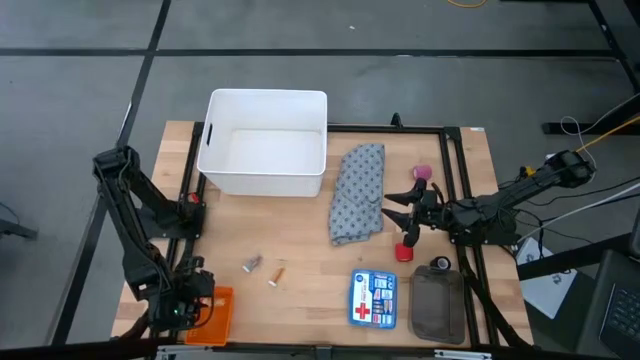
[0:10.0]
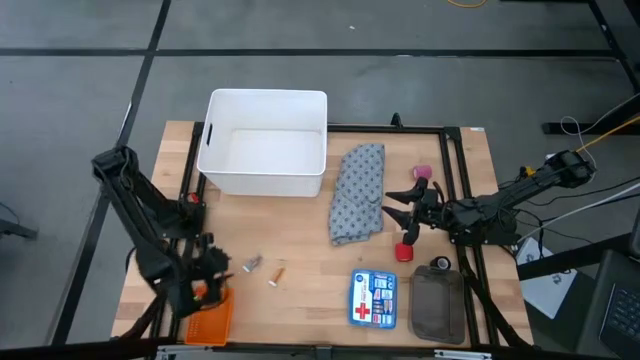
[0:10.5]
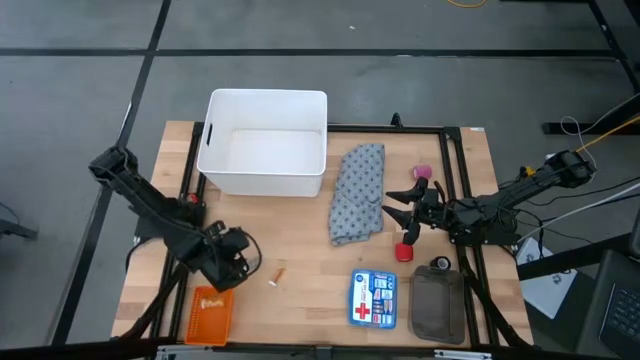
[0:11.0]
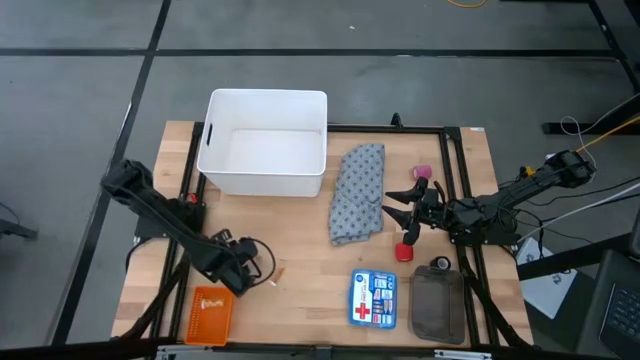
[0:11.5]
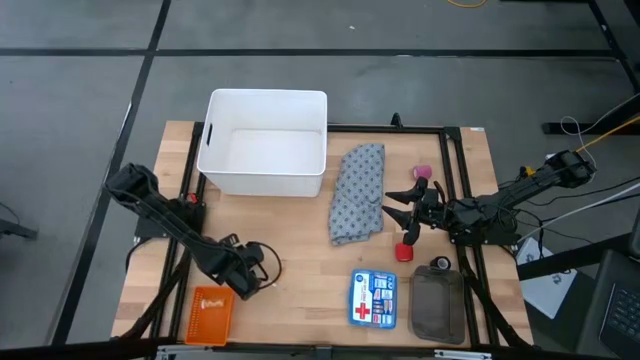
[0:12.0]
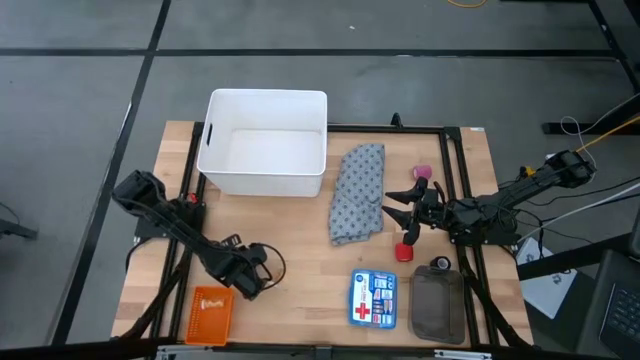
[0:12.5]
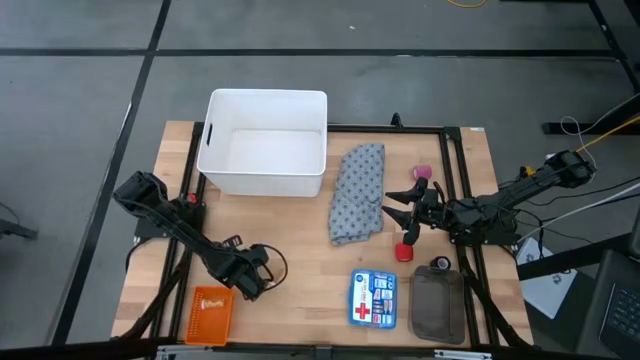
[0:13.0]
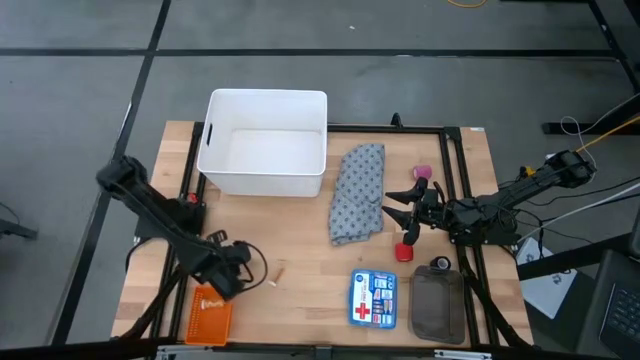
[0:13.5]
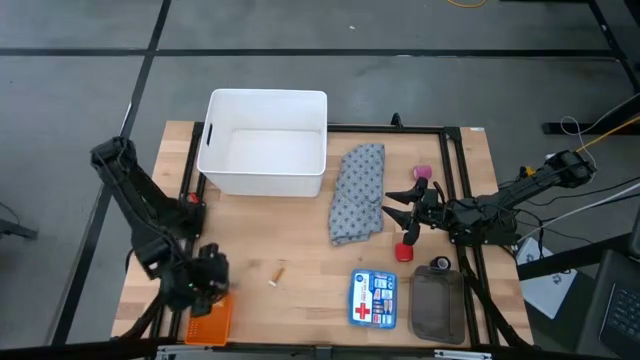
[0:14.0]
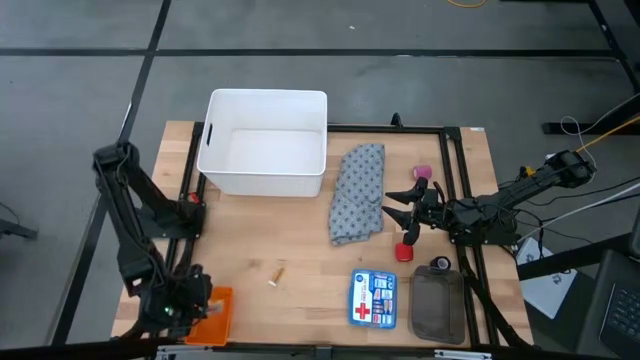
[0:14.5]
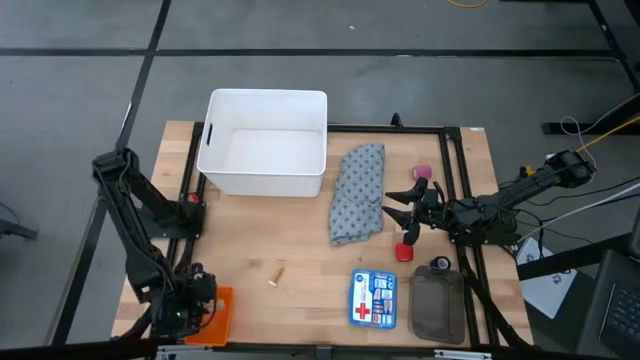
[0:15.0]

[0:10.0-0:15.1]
Task: Pick & place medical supplies in basket/bin
Put the blue pill bottle into the orange bin

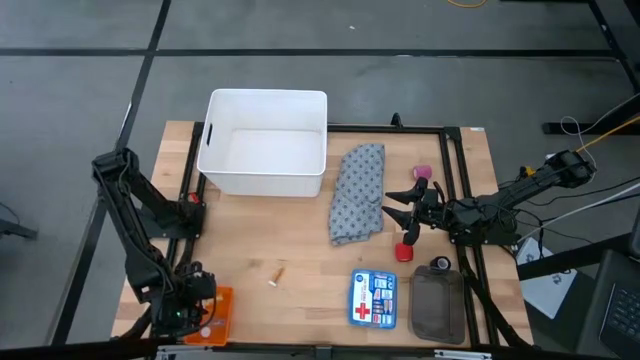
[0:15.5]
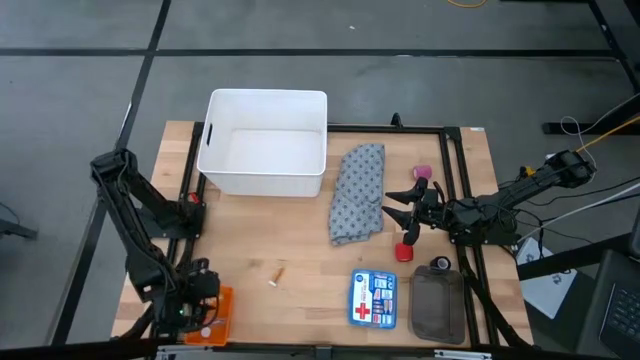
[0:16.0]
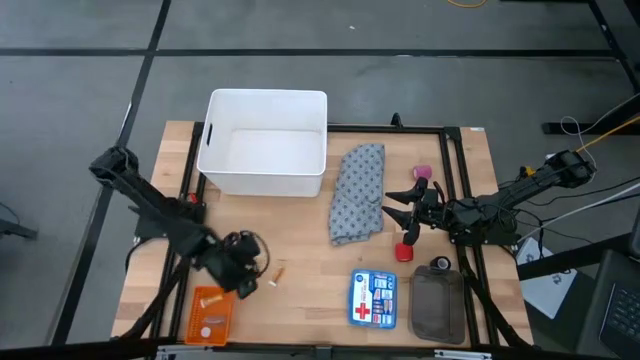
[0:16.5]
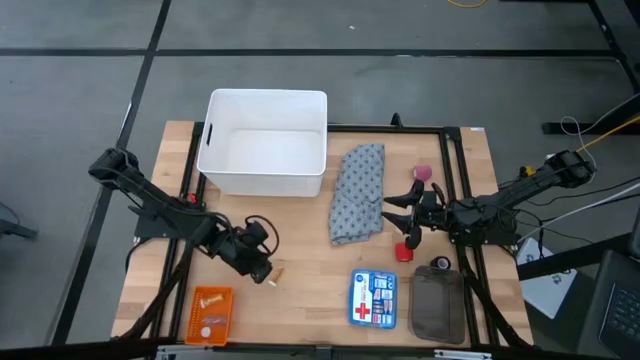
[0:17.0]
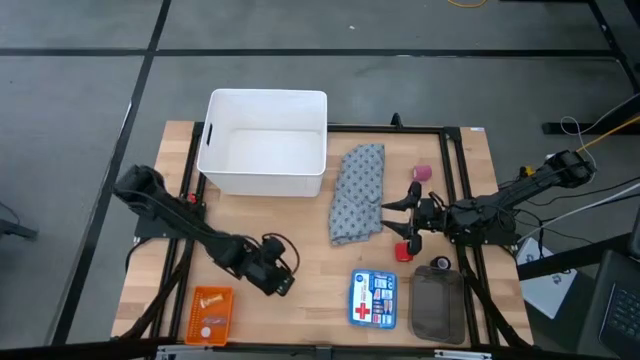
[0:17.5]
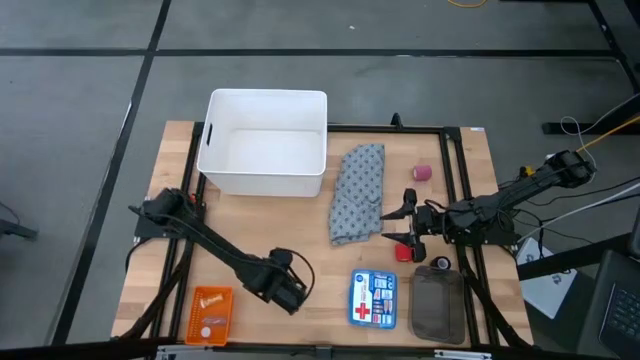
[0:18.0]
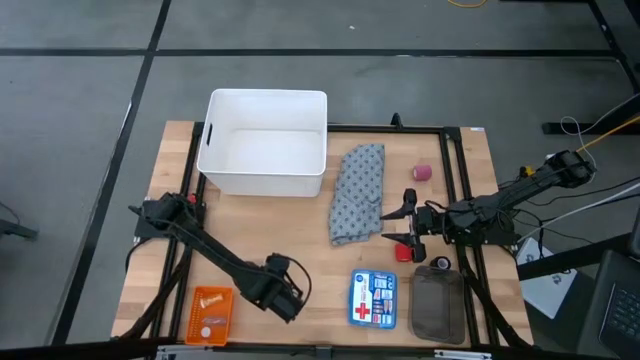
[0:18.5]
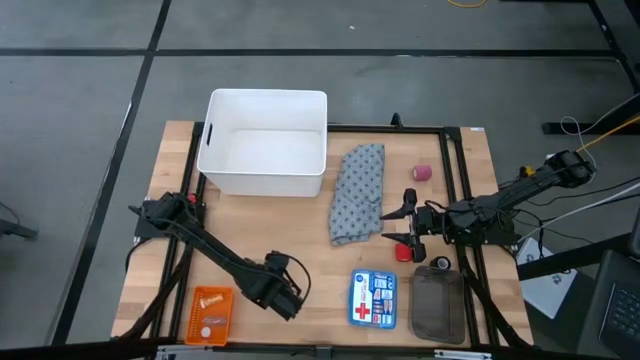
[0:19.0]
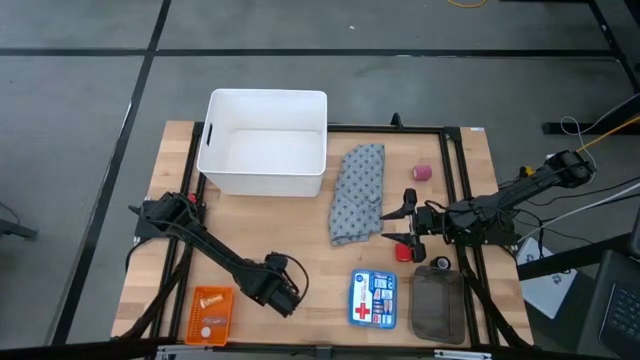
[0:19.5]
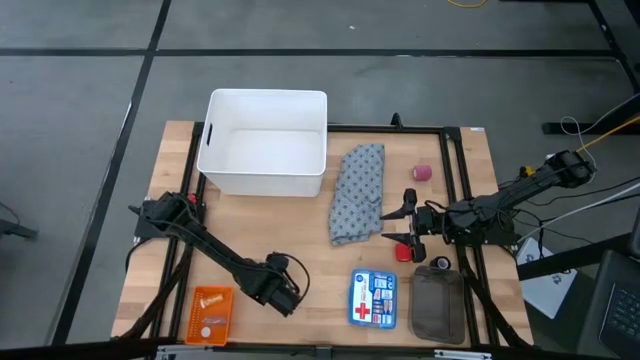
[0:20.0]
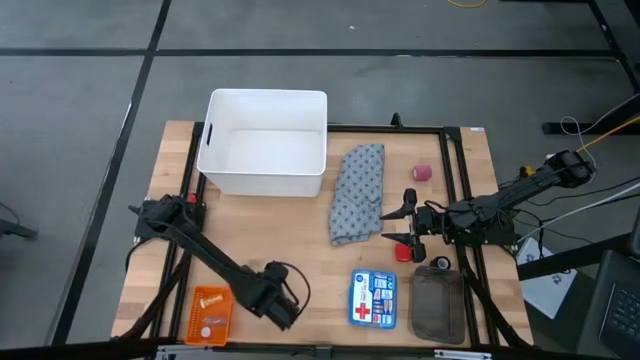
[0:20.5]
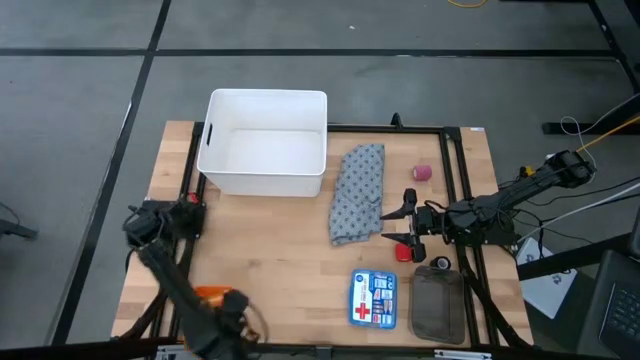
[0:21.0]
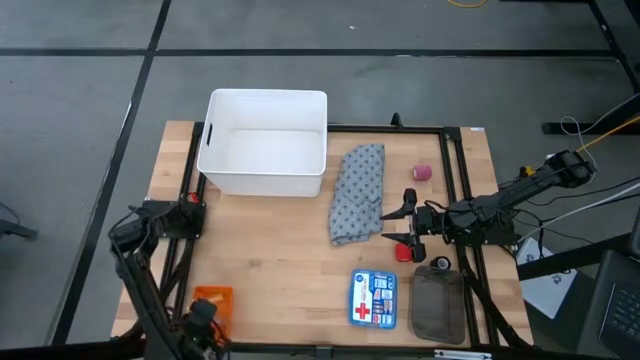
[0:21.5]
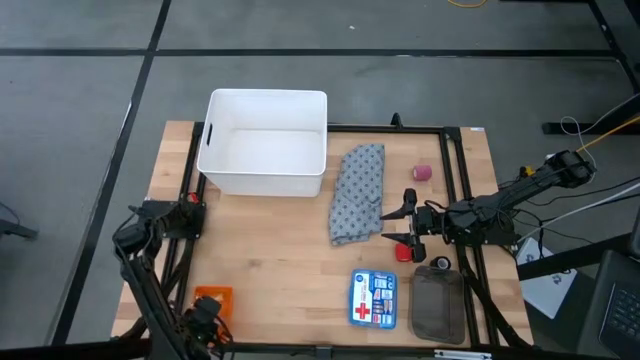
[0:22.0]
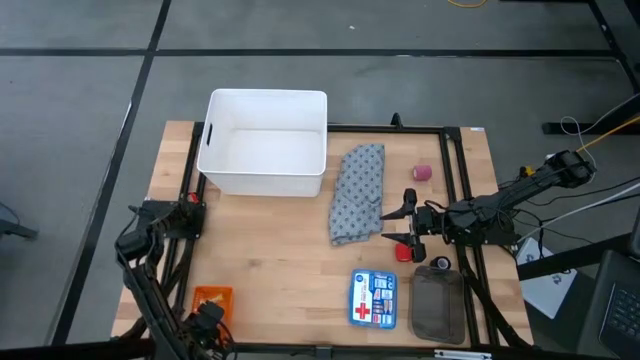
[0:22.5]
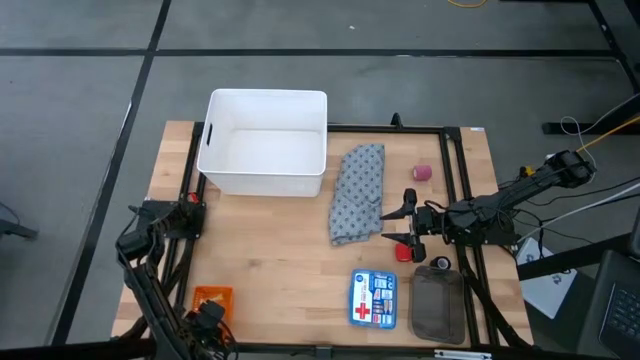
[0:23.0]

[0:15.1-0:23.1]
Put the yellow pill bottle into the orange bin

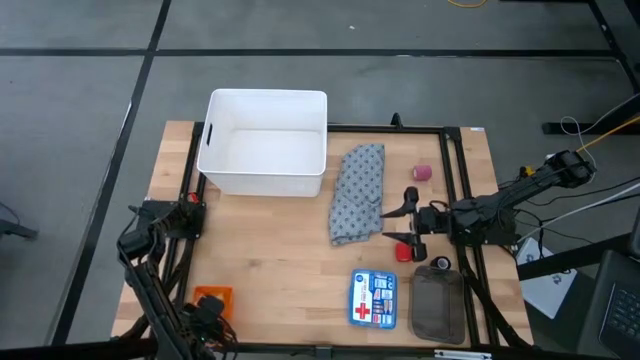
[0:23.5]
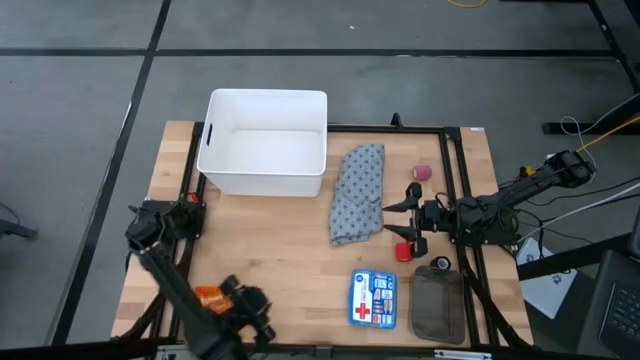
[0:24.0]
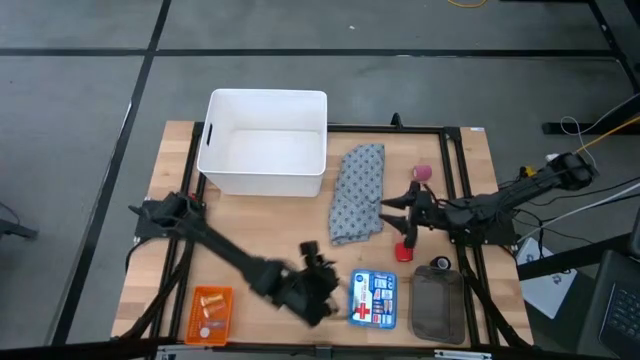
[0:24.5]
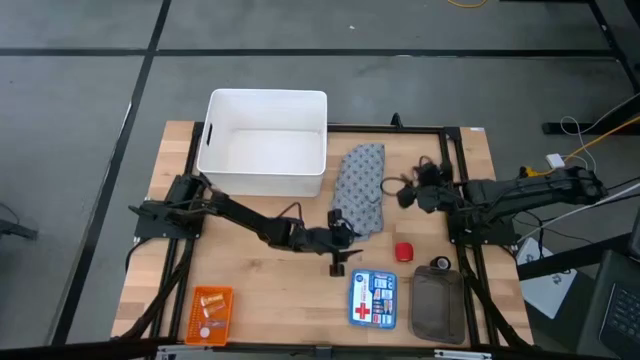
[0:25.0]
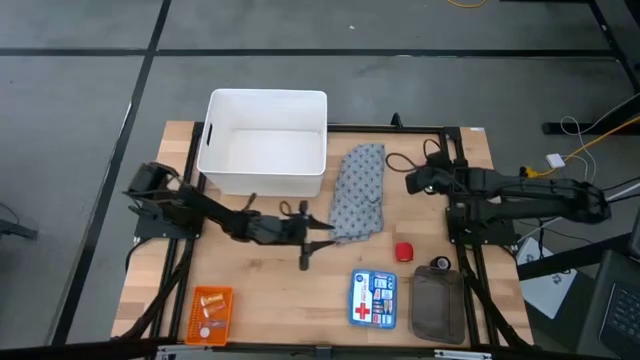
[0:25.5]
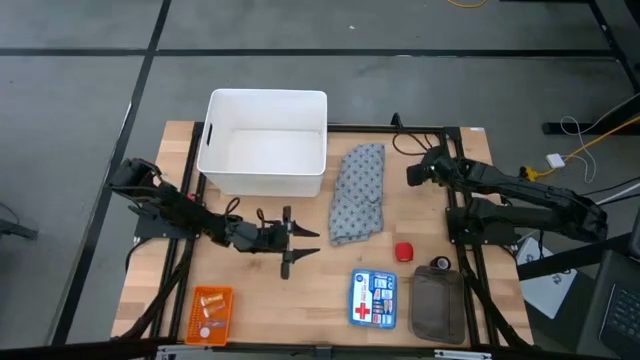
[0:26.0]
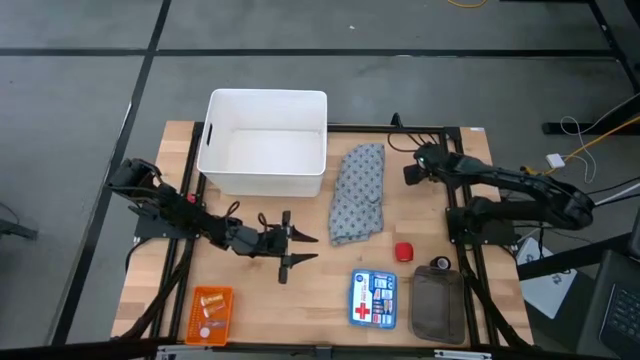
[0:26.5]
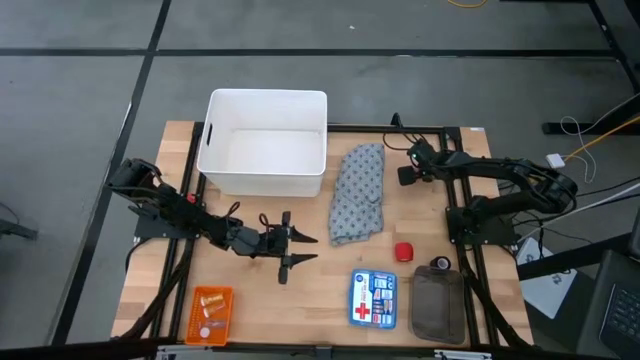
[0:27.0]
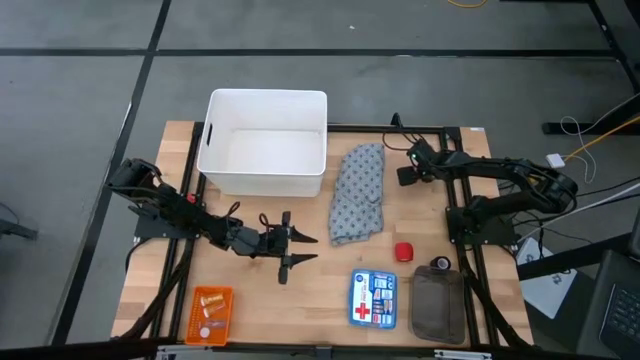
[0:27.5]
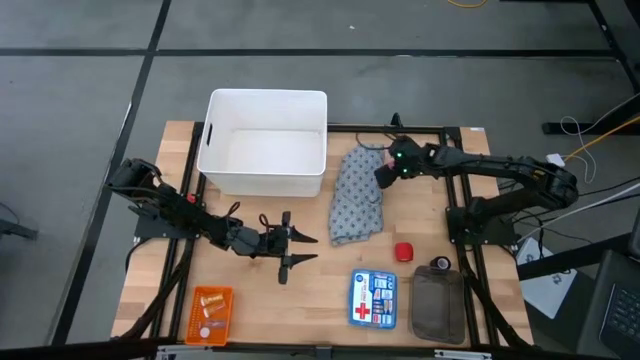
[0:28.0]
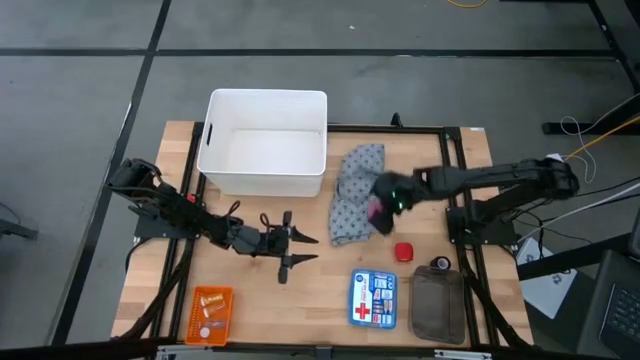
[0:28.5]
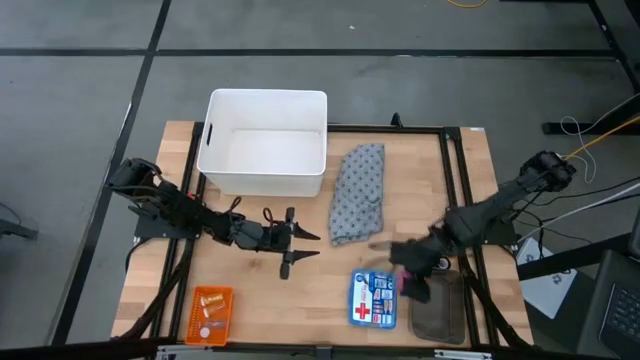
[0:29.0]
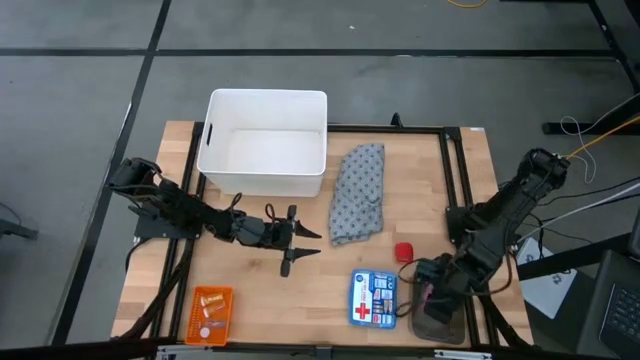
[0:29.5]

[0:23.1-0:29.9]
Put the pink bandage into the black bin

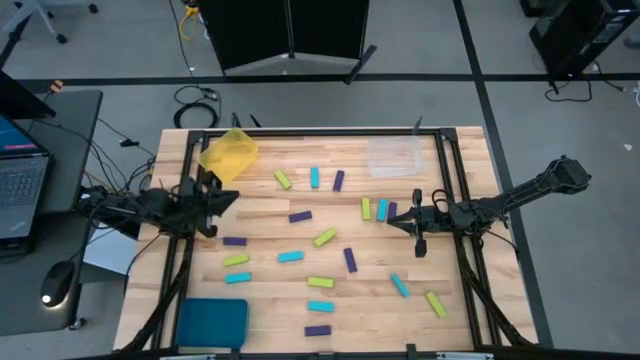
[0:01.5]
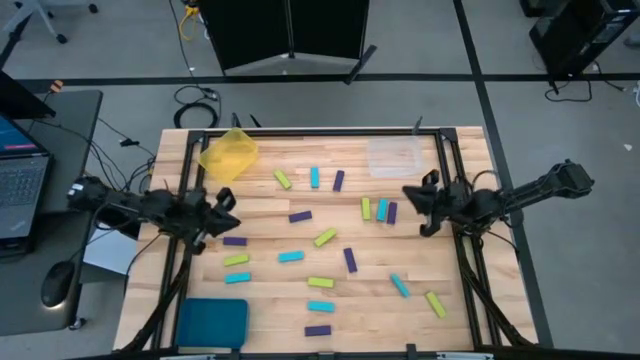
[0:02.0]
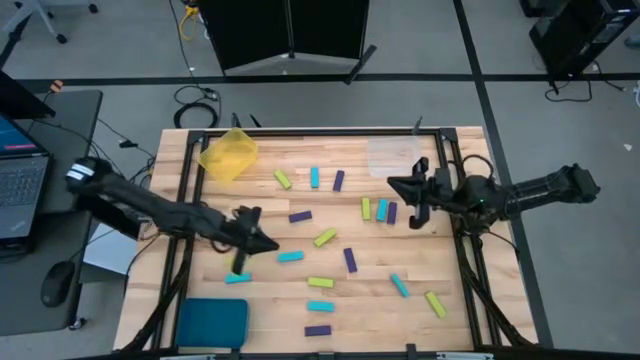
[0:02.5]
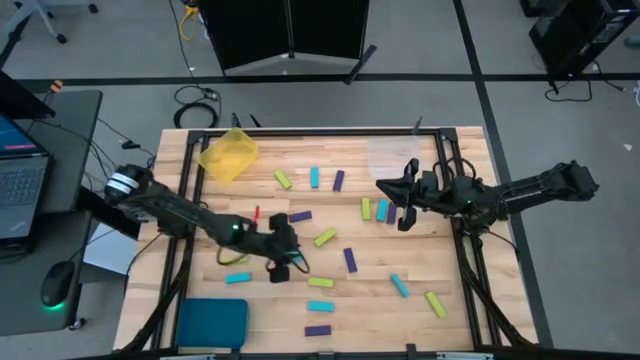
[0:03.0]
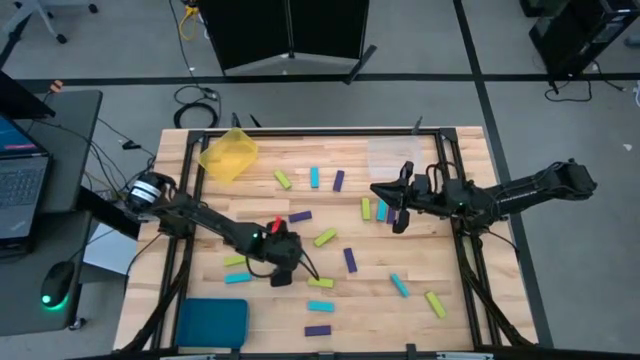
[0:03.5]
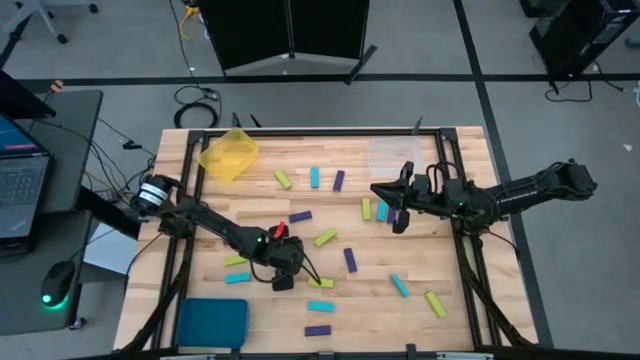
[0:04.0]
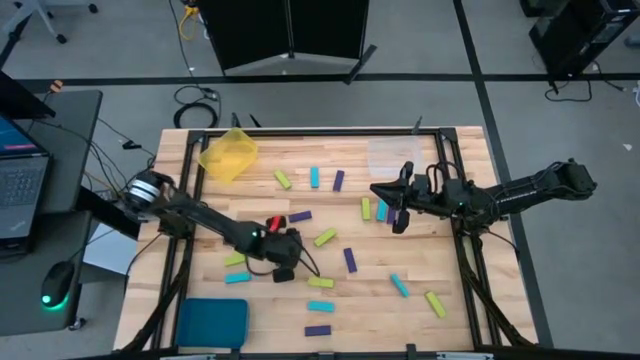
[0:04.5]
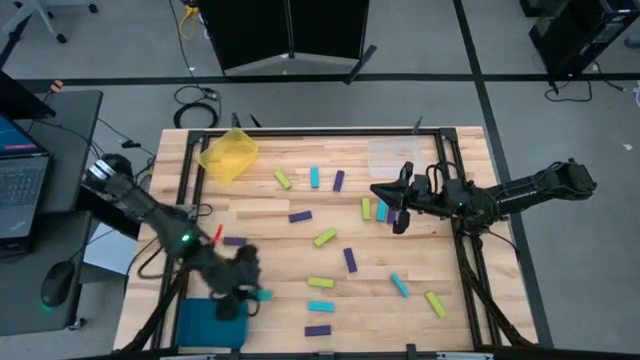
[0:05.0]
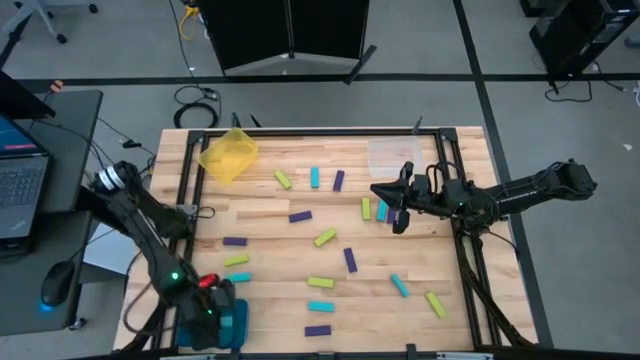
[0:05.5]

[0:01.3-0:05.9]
Task: Sort blocks
Put the light blue block into the blue bin
